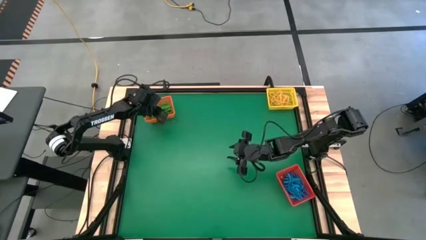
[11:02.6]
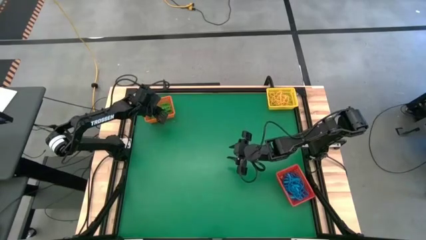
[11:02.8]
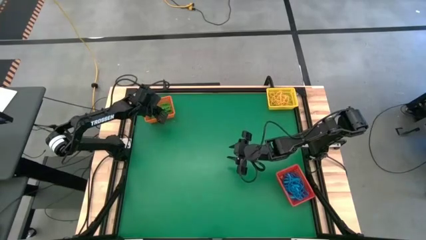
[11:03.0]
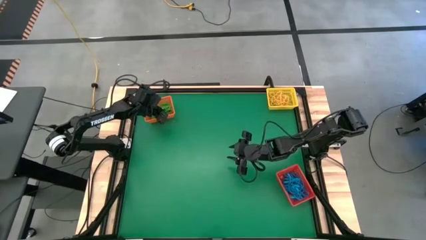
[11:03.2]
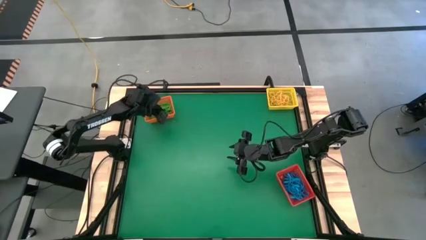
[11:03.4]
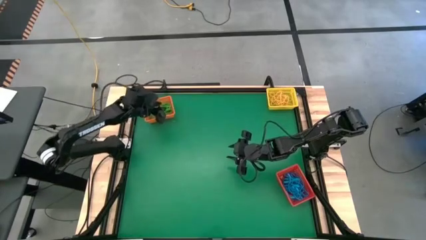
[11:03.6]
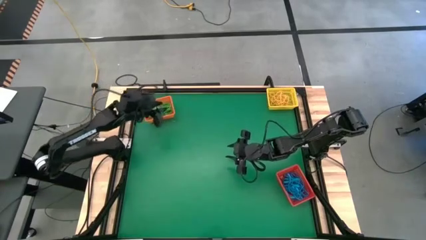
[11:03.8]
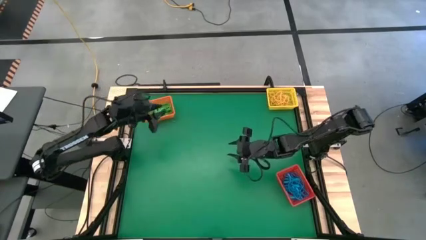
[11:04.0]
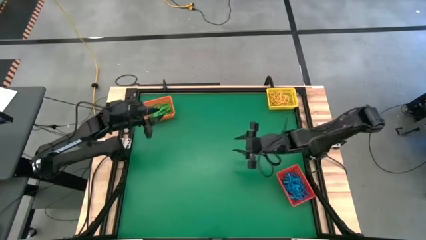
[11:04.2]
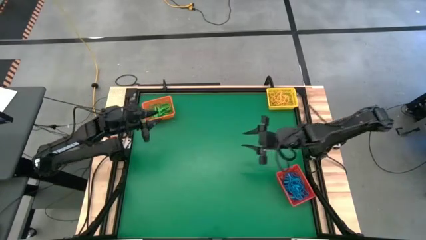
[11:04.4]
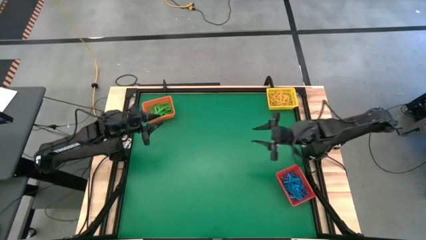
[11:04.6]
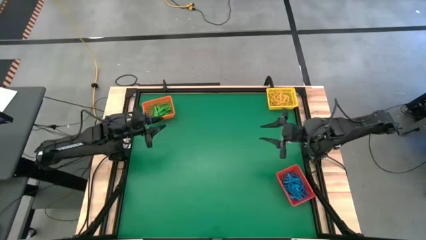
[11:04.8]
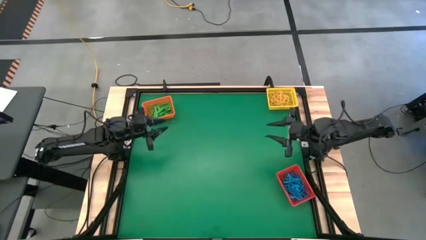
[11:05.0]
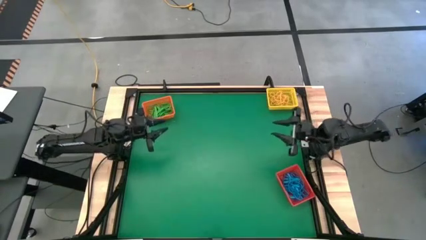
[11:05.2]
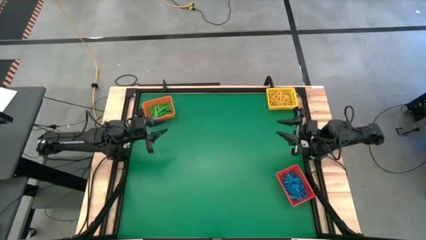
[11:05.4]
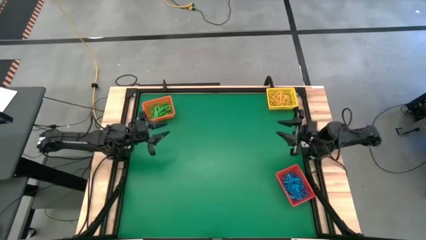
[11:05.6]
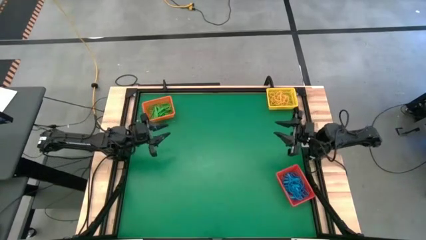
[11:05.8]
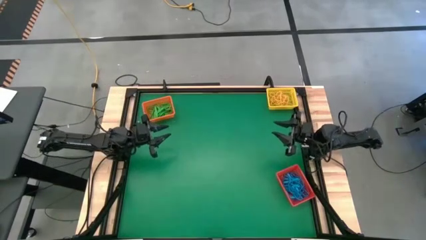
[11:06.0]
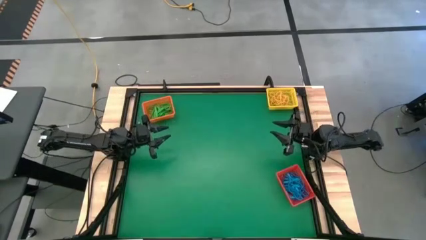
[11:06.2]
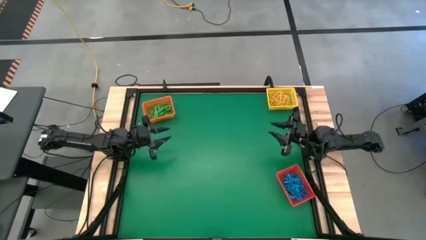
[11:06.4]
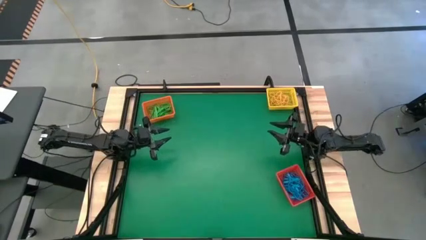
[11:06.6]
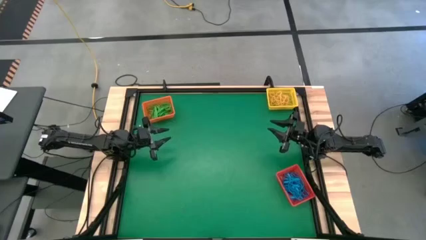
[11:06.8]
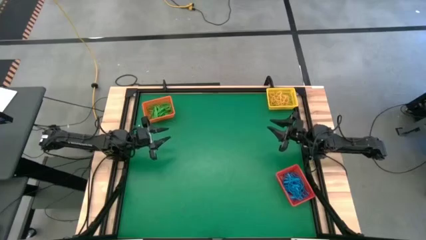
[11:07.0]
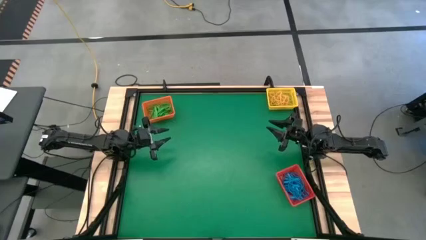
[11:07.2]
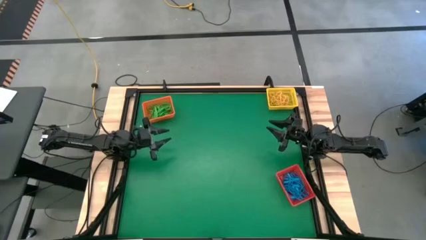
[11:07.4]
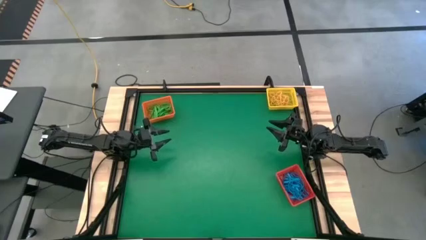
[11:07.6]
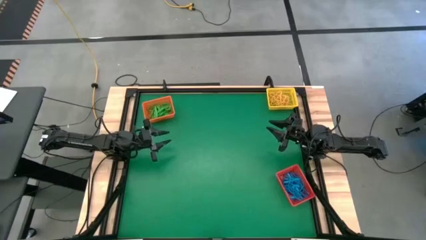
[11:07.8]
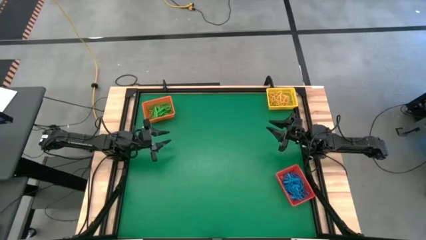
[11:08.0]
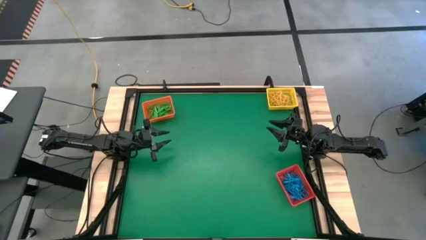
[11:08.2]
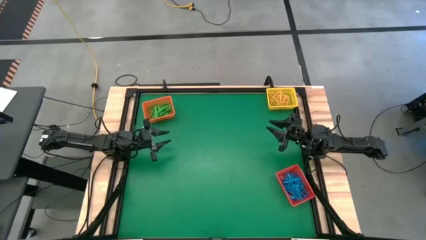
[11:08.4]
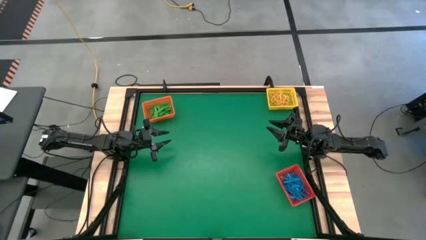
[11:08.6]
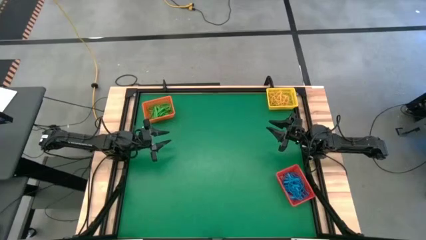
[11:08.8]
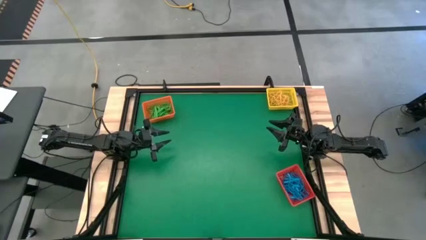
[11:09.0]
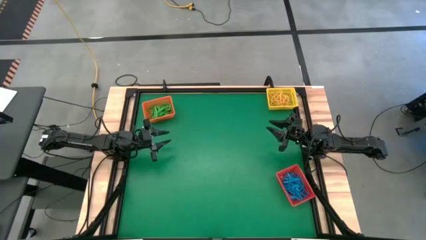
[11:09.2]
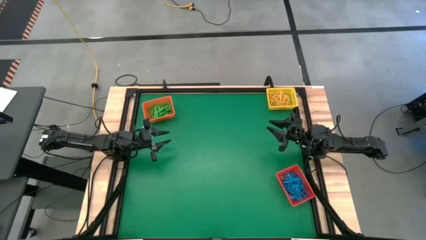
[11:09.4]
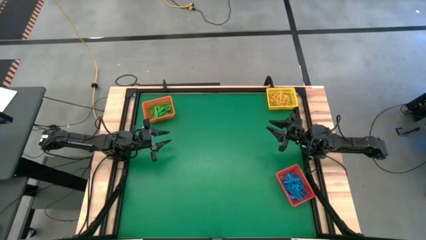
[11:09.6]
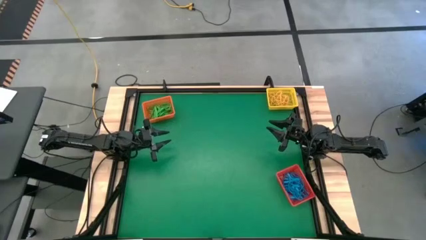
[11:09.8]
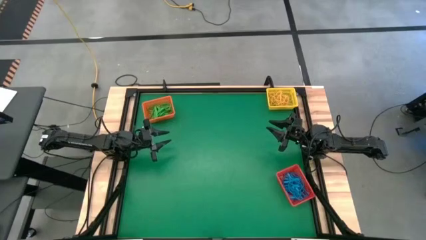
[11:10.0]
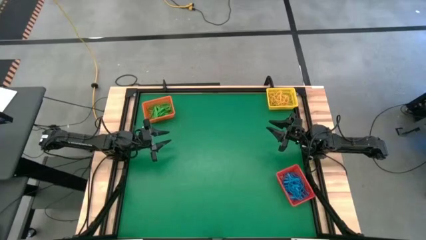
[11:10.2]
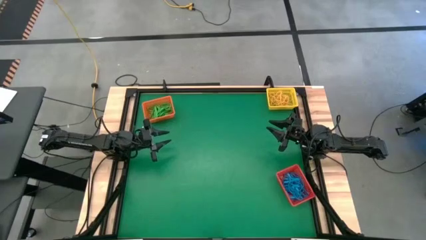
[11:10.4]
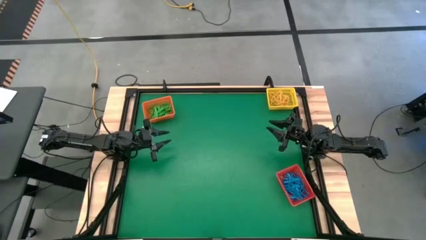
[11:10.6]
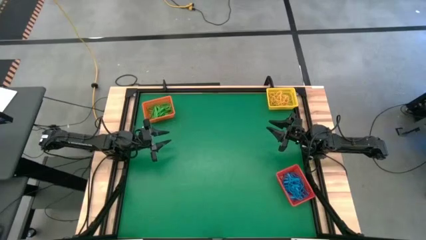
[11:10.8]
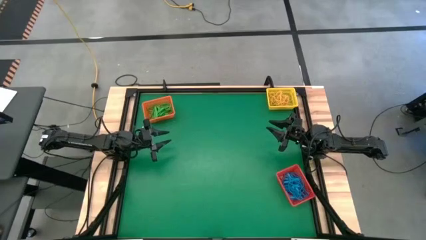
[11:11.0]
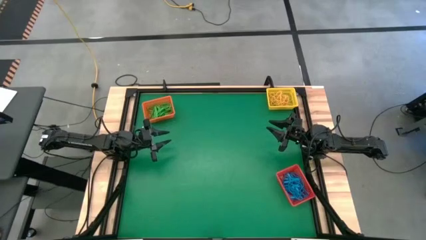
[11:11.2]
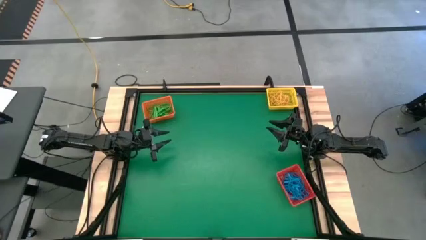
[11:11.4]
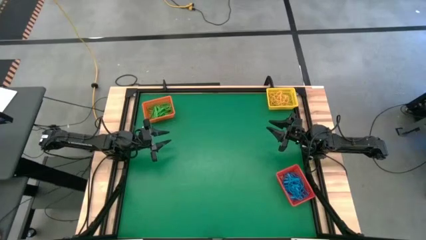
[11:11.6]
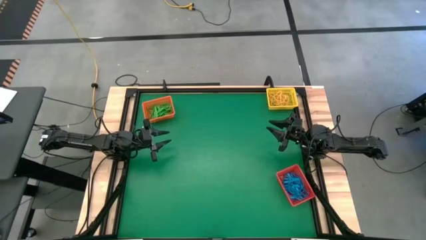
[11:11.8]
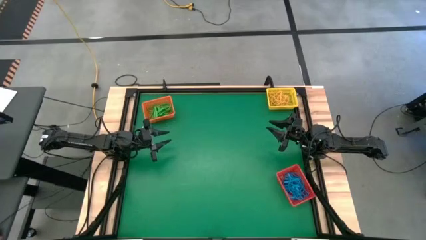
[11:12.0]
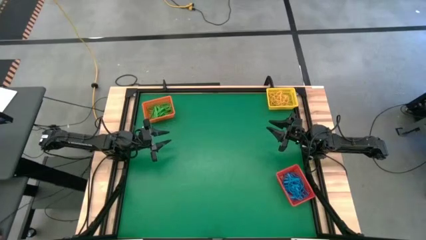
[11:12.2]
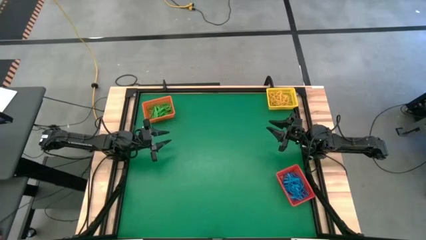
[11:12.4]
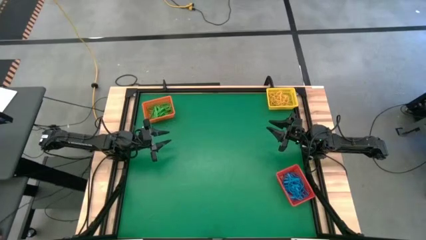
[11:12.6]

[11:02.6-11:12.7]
Task: Sort rubber bands into baskets
Return to Home Position

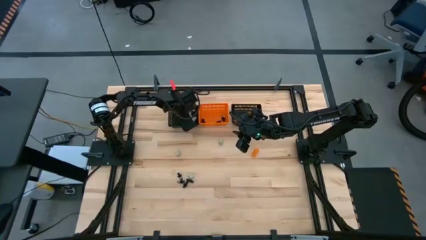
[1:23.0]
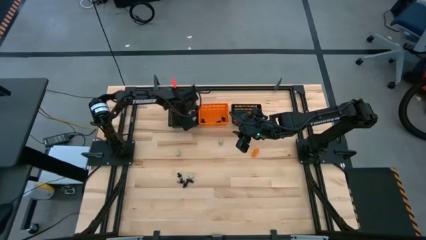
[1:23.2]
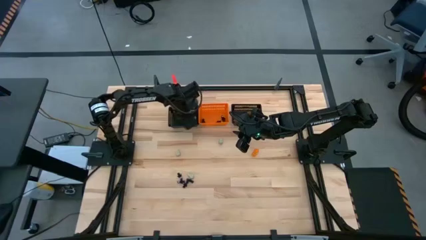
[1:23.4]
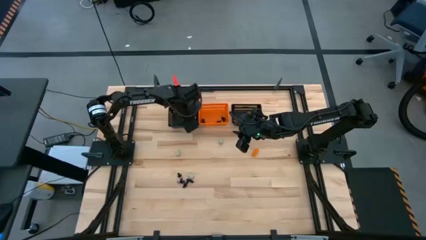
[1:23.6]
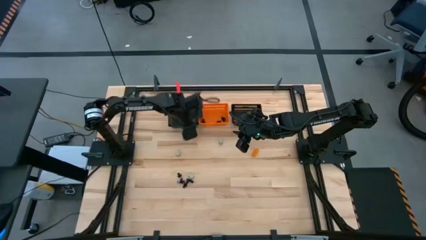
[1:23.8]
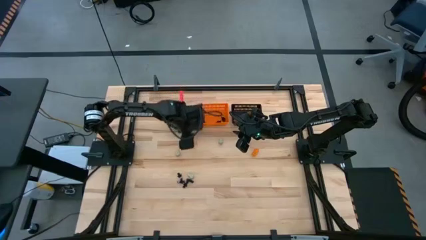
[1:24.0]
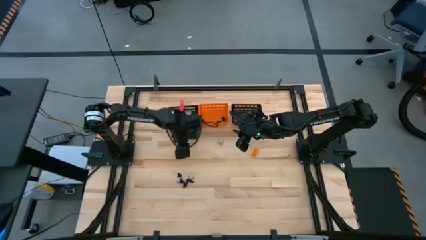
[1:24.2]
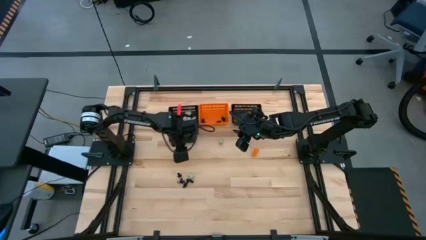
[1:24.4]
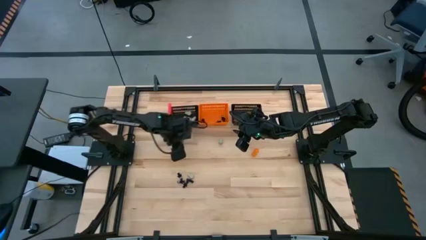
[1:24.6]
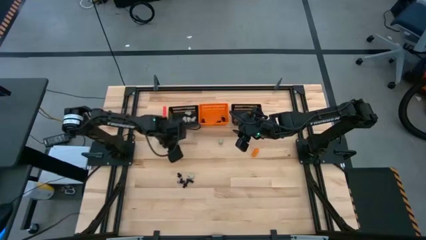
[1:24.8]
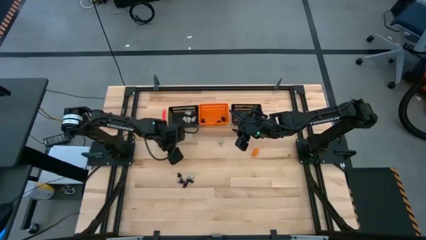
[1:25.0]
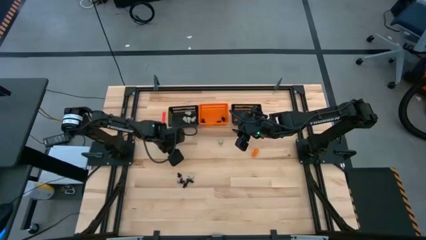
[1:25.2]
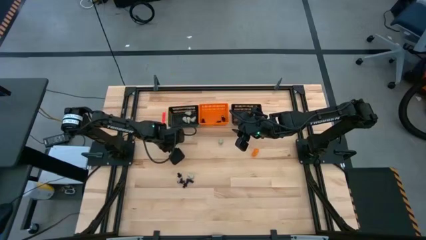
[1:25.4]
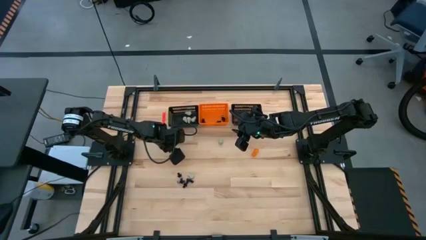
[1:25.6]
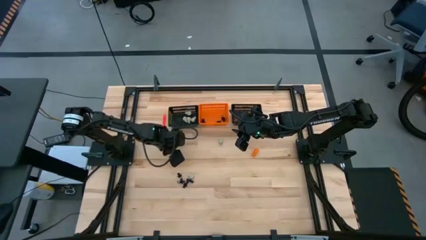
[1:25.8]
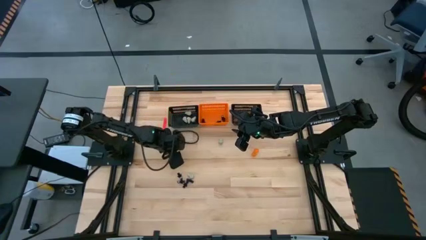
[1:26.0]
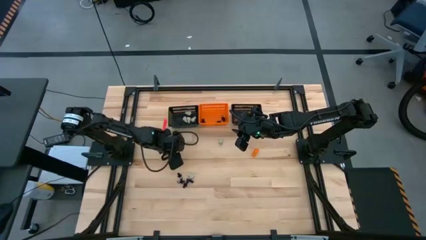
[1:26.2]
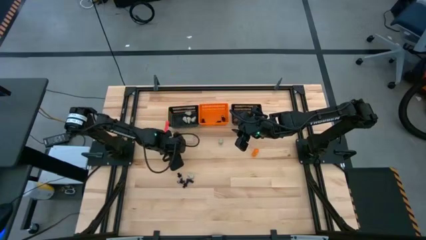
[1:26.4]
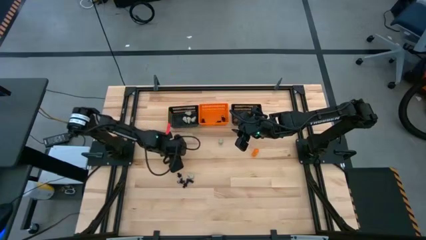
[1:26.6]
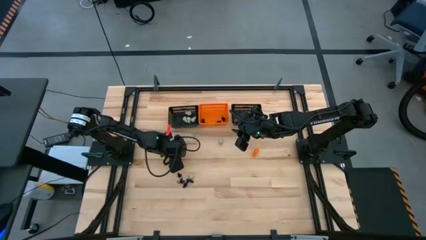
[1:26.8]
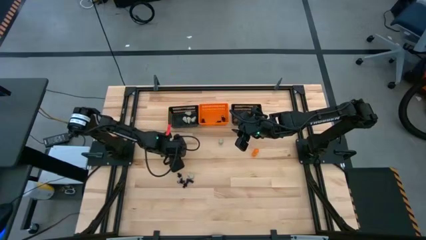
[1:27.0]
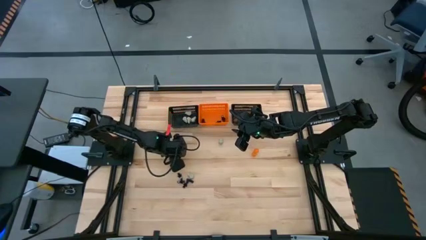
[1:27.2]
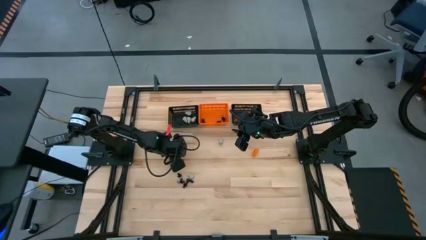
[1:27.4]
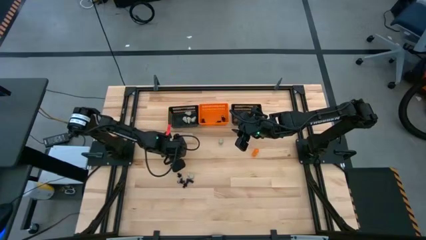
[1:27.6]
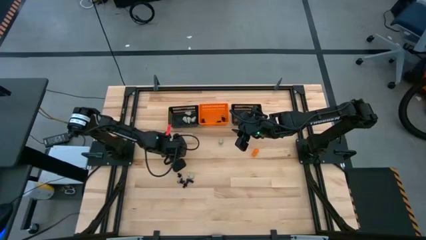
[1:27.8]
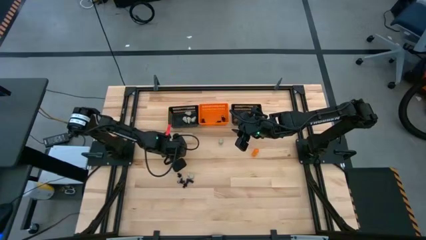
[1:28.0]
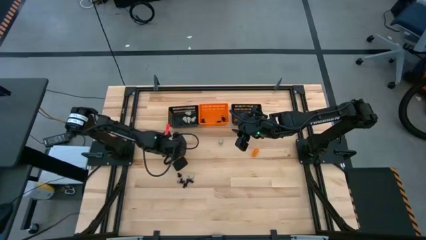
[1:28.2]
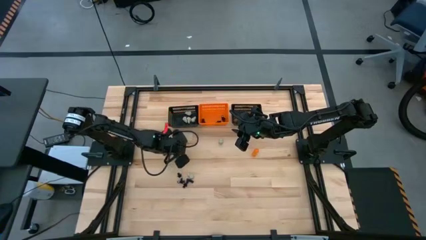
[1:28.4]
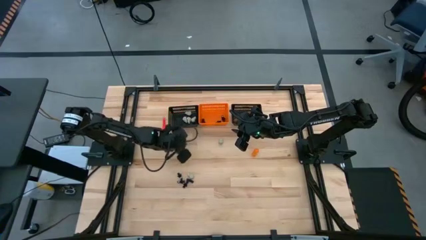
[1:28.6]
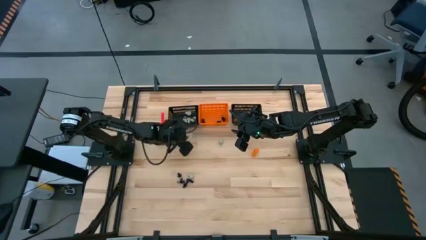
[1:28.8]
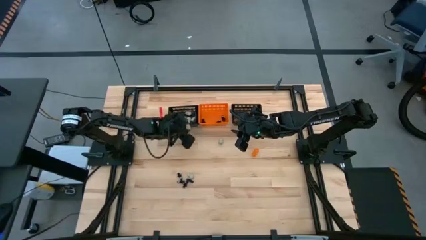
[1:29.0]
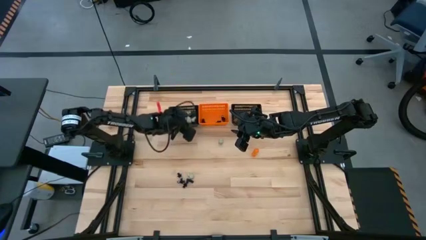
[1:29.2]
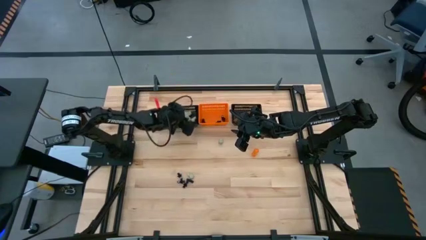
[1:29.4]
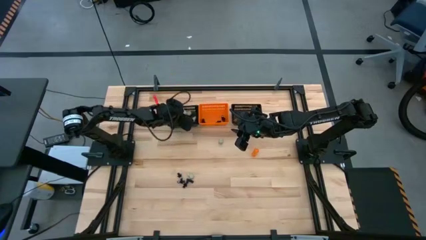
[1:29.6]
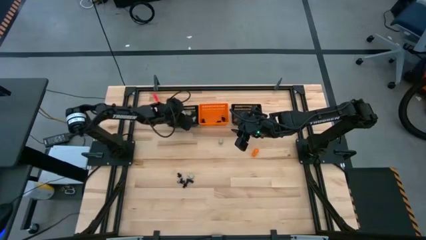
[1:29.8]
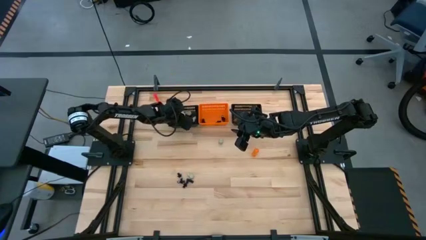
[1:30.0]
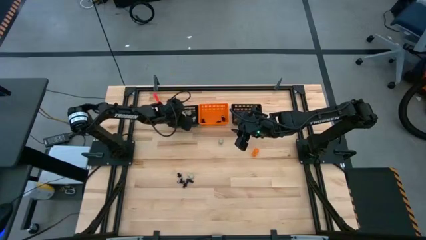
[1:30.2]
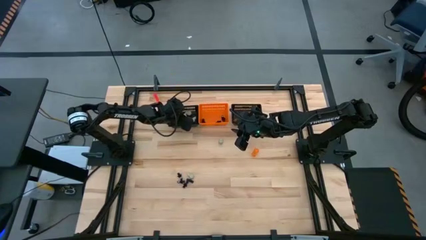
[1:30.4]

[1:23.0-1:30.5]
Task: Sort Halloween decoration
Put the white skull toy into the left black bin
